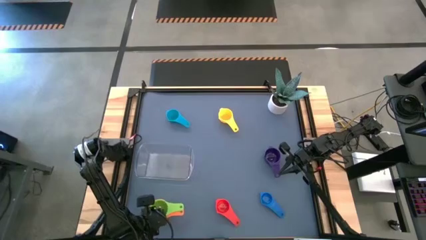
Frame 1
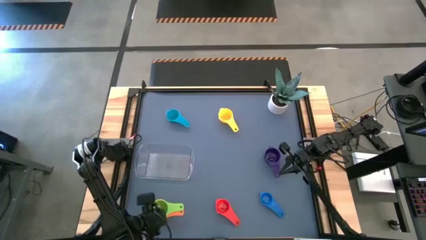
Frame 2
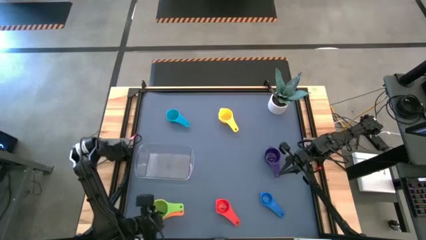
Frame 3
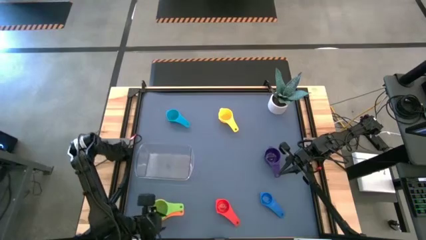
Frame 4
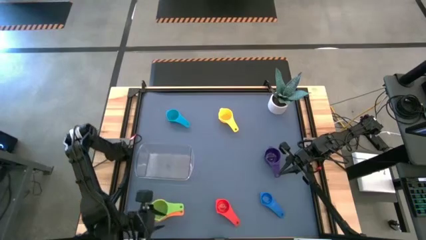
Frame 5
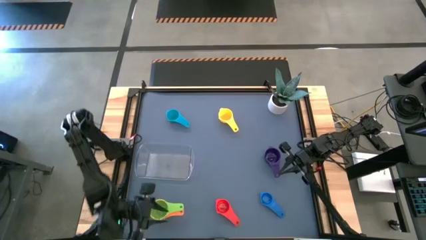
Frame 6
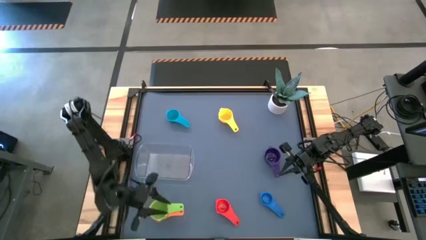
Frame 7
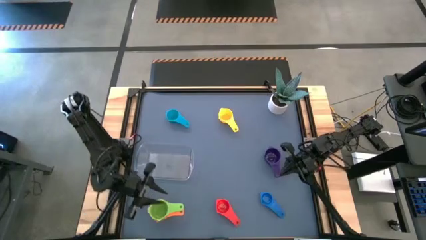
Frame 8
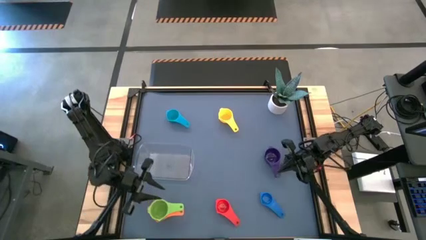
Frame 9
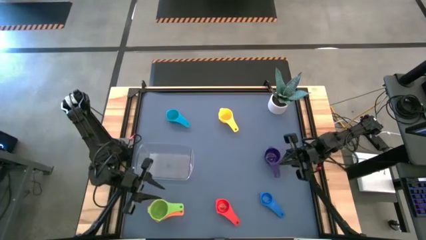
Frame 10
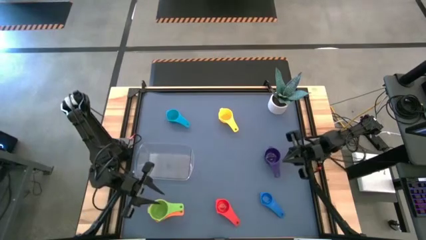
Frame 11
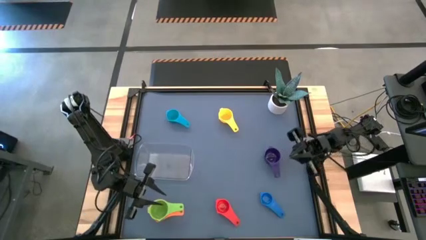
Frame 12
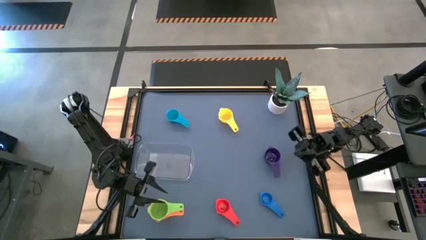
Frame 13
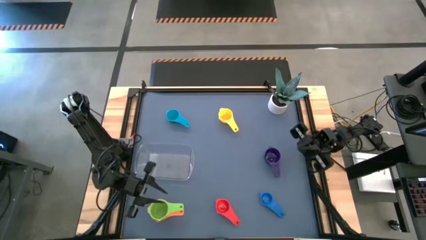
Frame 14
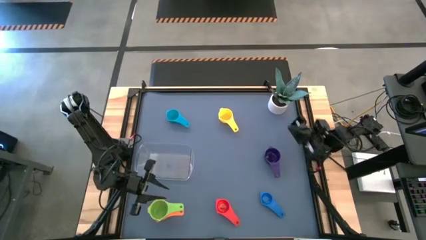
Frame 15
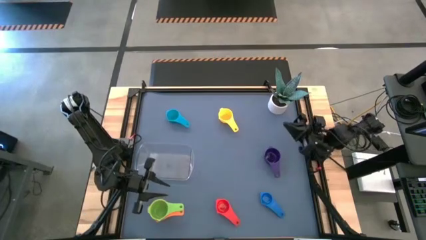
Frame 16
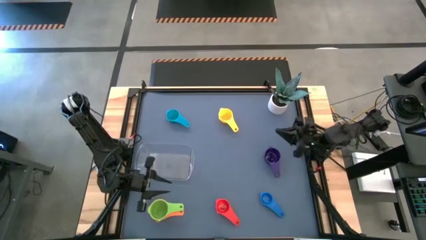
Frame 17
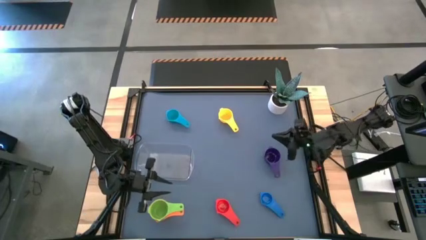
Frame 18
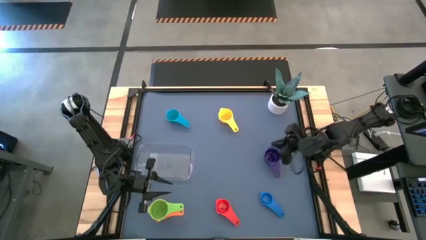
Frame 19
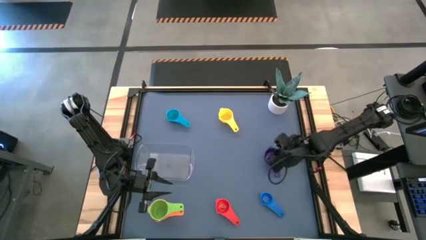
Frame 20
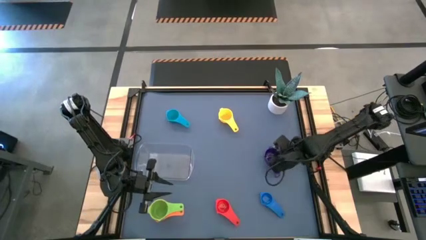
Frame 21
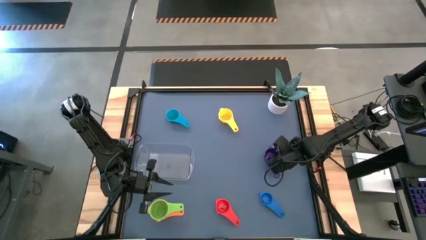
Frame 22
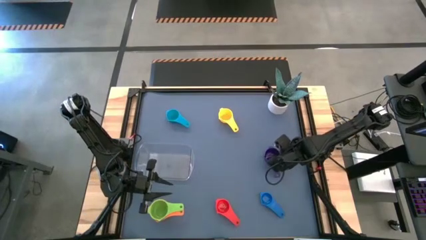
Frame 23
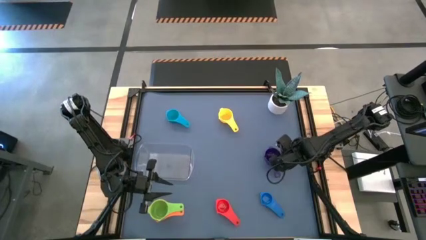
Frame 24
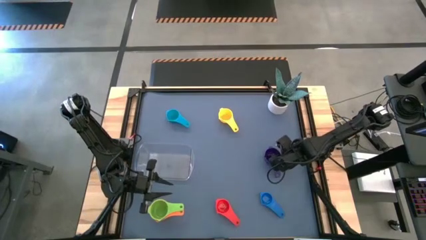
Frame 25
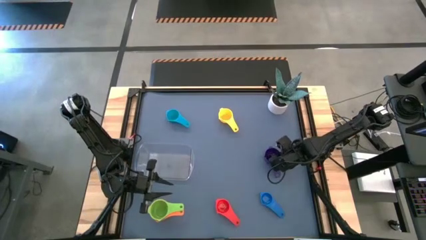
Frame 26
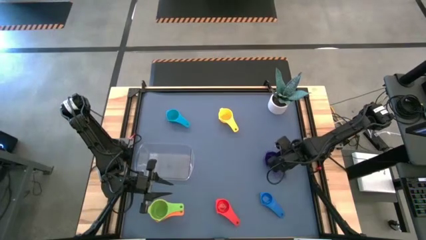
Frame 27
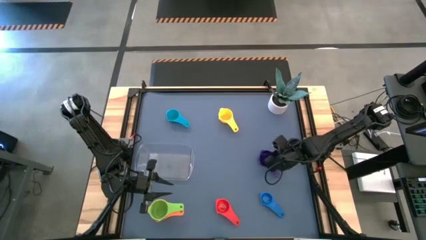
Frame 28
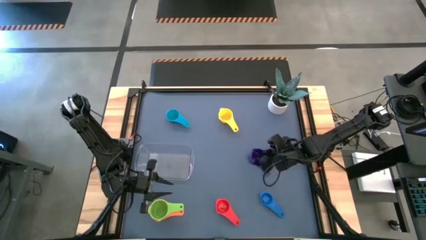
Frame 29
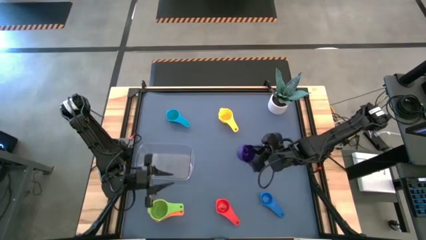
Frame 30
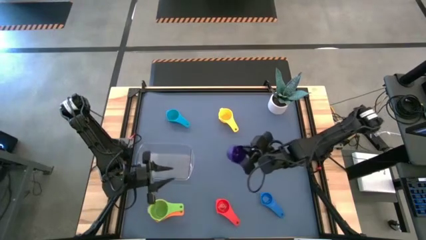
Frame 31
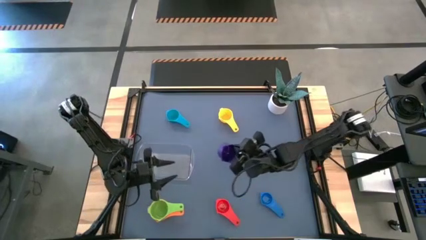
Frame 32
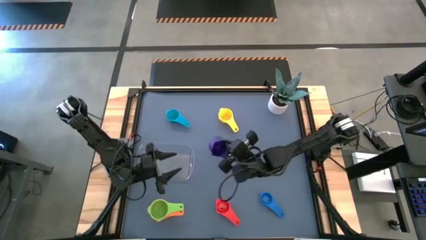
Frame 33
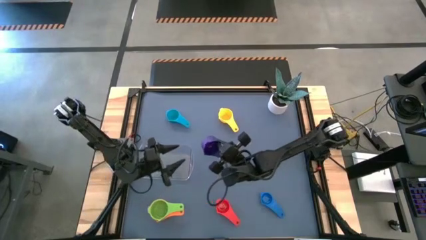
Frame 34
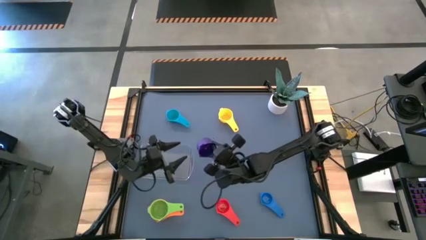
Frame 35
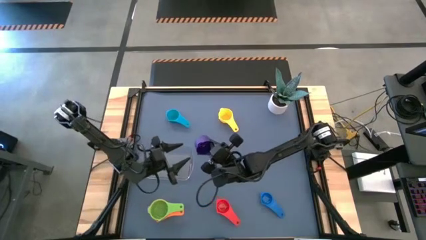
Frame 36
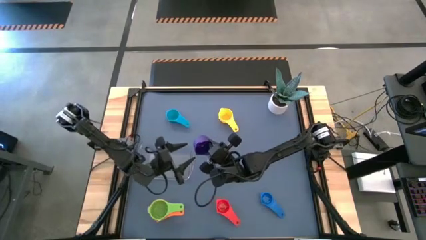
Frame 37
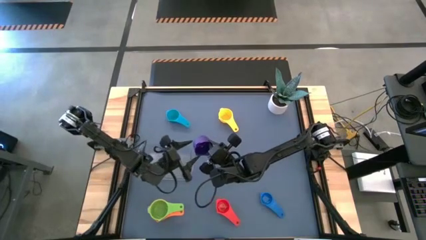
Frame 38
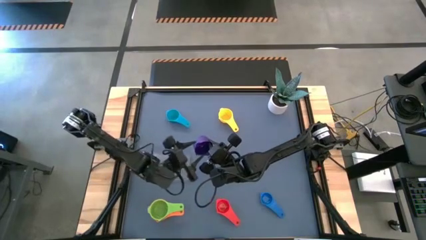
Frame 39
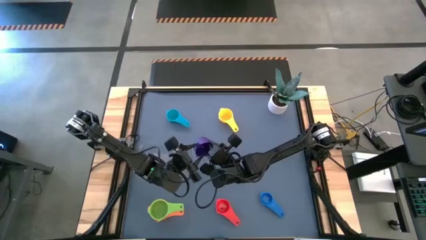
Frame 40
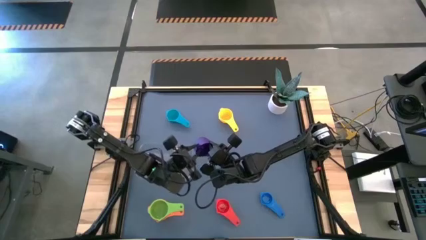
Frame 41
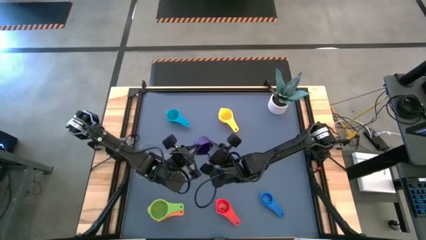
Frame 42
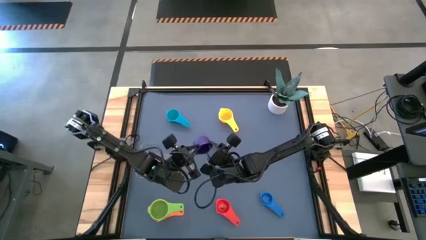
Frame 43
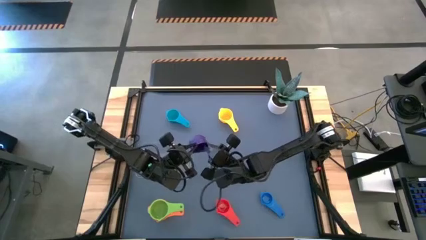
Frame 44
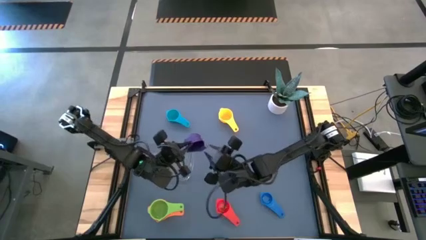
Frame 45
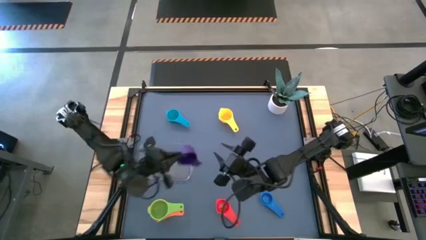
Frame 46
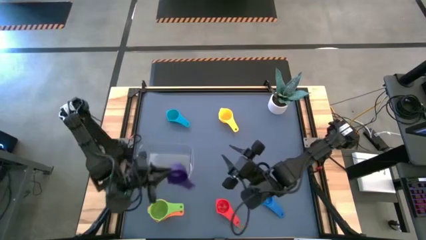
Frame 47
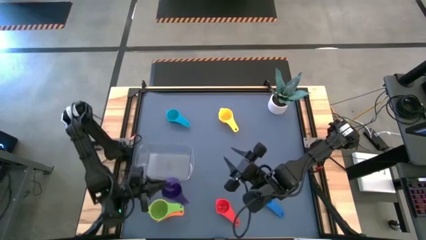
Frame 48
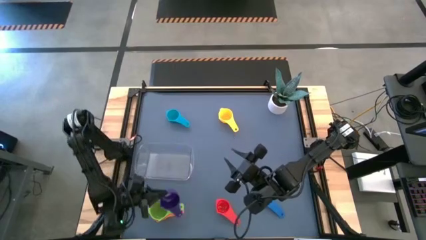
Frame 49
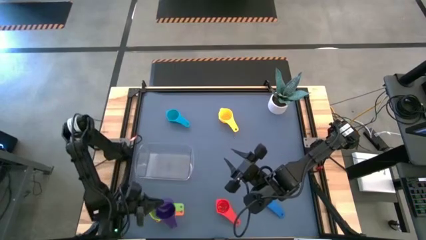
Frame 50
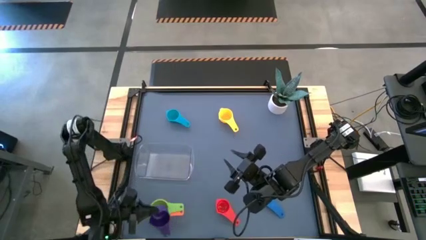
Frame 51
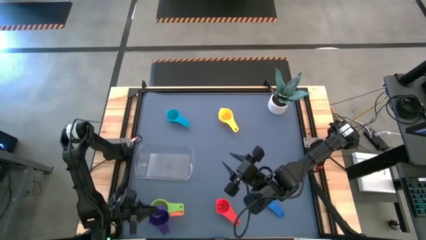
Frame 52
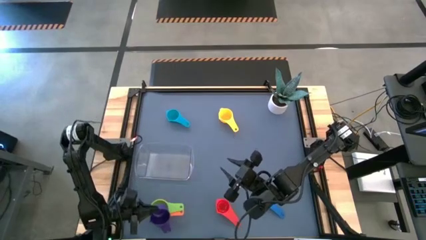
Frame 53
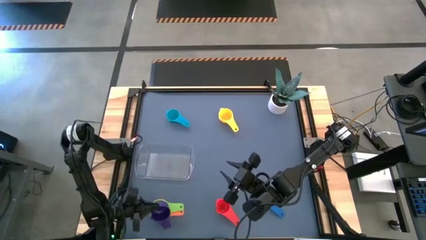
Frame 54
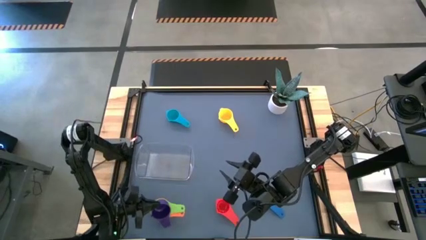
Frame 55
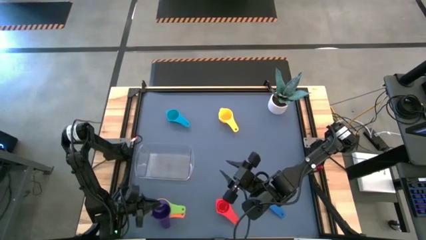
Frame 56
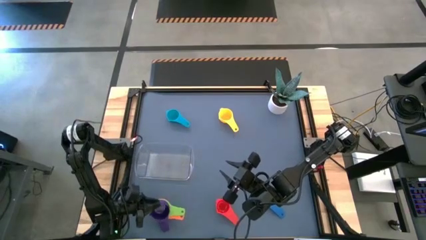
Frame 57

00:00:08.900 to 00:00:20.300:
Task: Nest measuring cups in basket
Stack the purple measuring cup on top of the green measuring cup

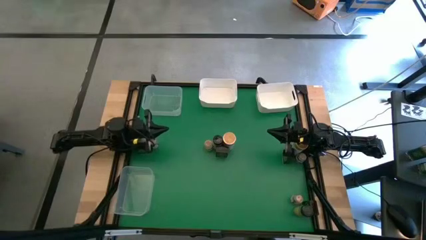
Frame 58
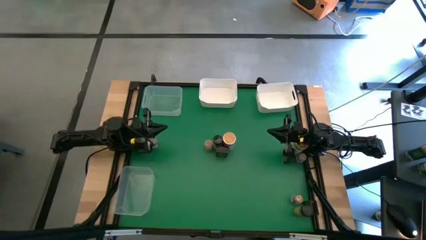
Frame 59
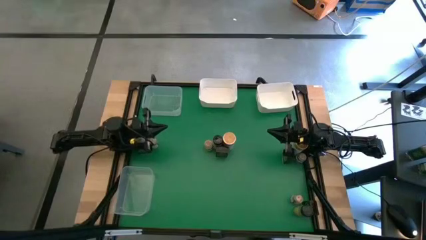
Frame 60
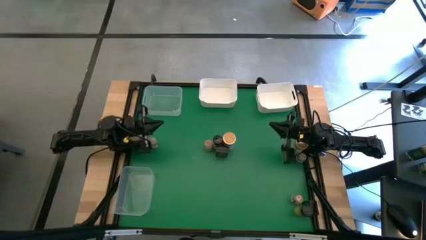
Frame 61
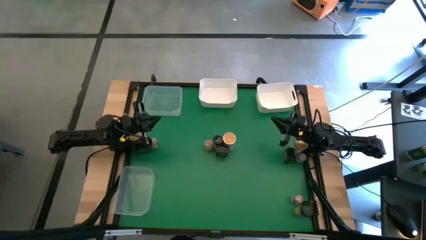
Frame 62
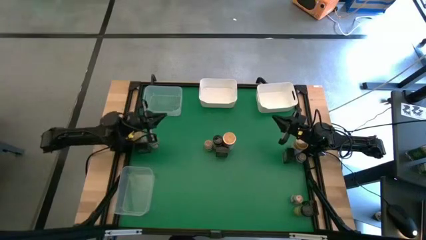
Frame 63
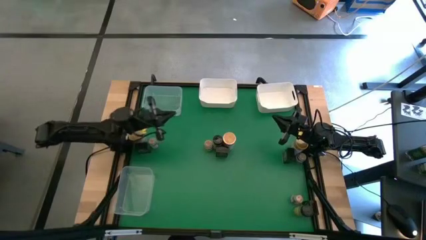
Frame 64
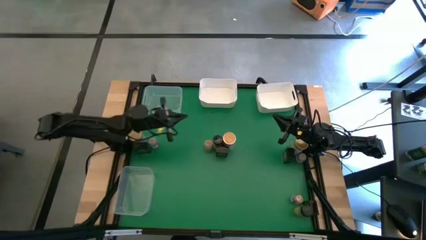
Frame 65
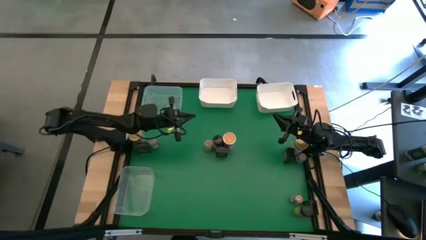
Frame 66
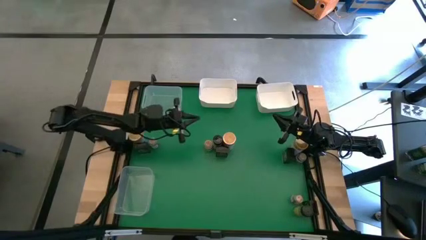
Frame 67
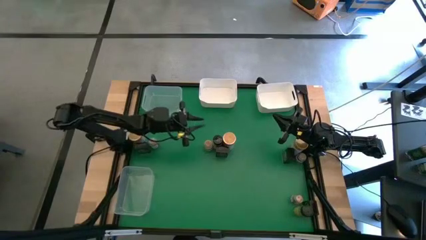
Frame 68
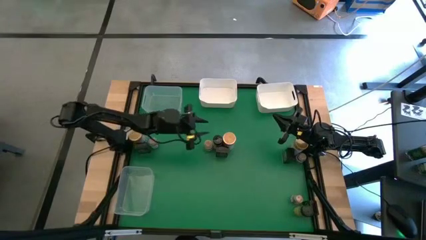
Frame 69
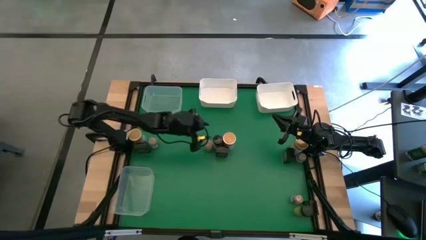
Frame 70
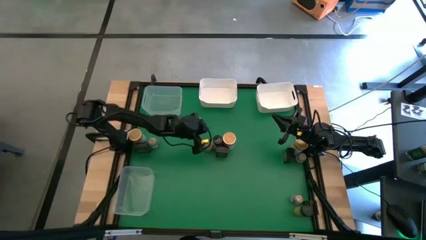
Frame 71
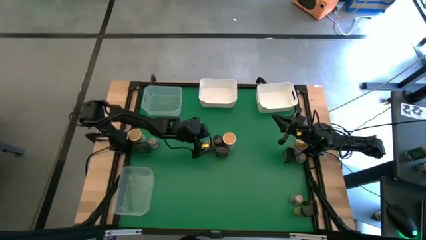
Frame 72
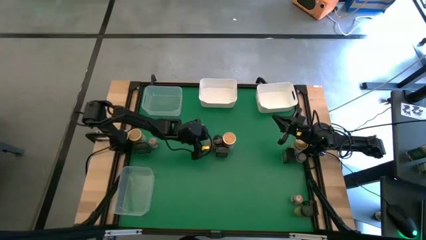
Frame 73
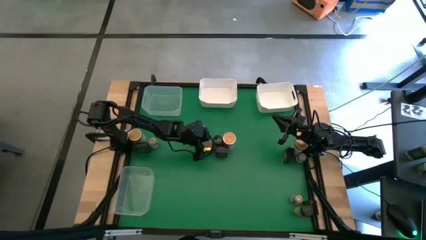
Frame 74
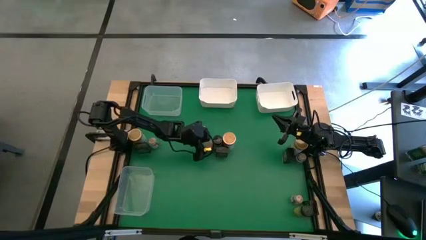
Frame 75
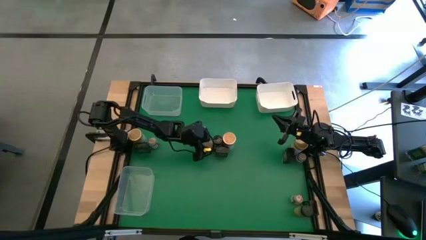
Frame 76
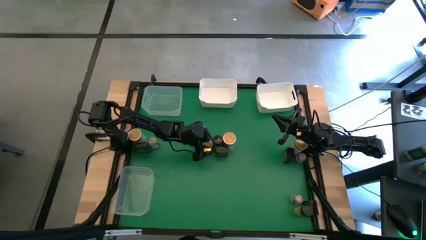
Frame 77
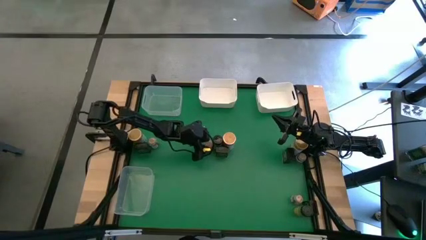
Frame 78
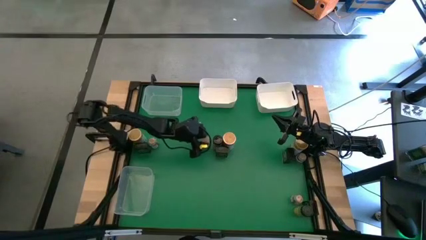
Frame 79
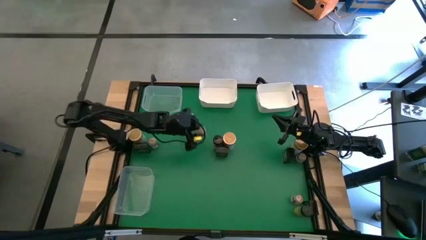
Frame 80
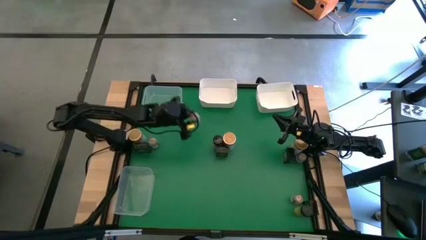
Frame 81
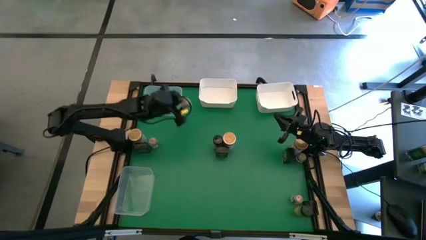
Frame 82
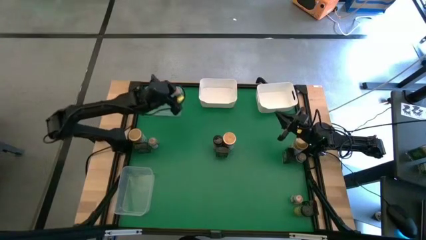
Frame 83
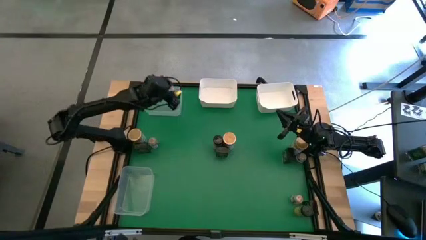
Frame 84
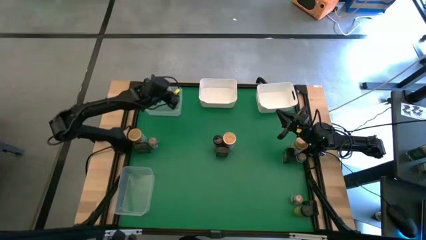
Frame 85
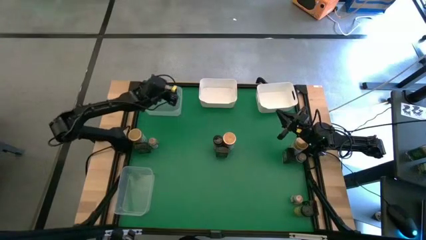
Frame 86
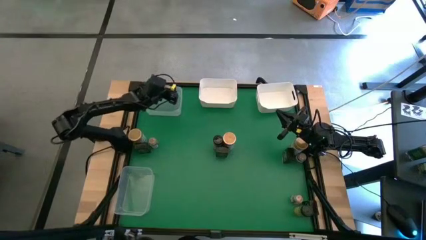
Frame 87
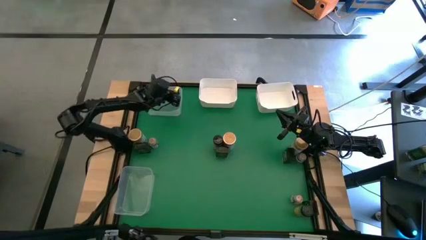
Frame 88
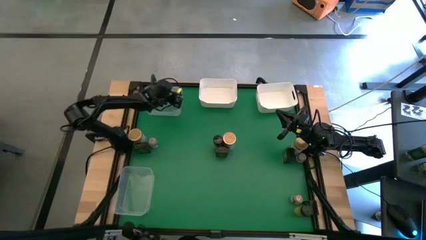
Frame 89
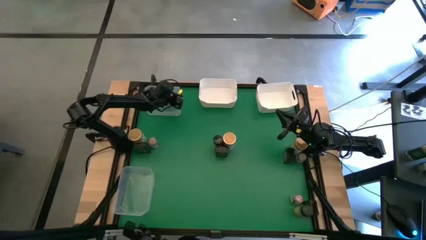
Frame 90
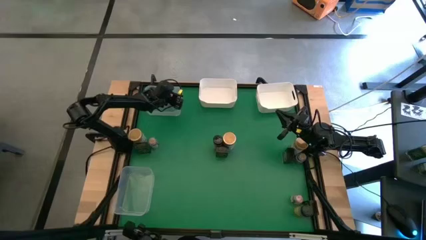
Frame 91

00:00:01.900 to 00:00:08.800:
Task: Sort spices by type
Put the middle small brown seasoning bottle into the top transparent bin
